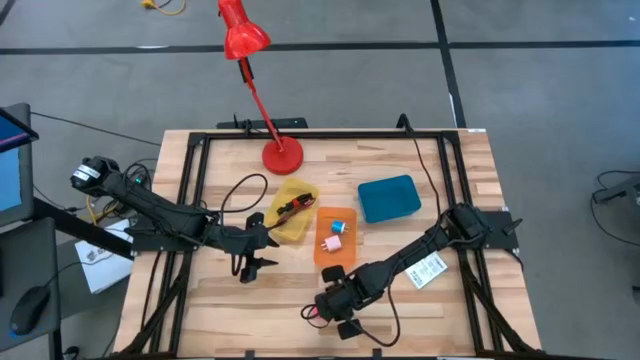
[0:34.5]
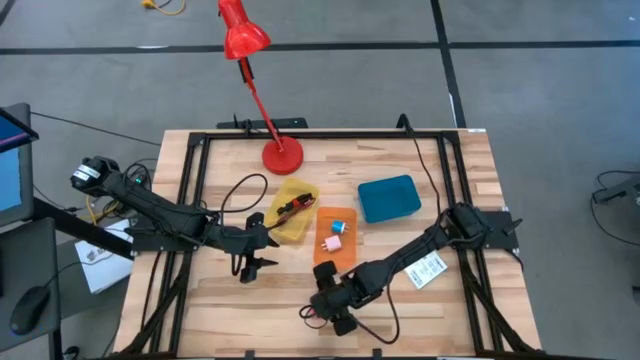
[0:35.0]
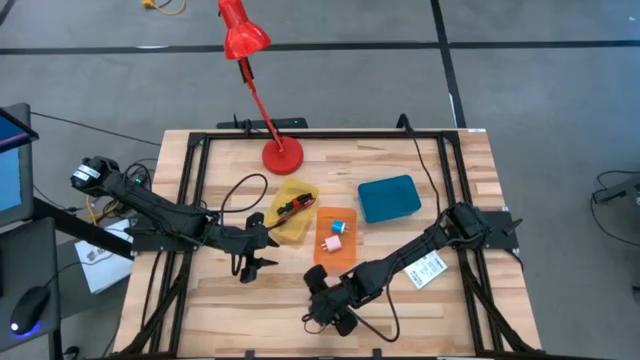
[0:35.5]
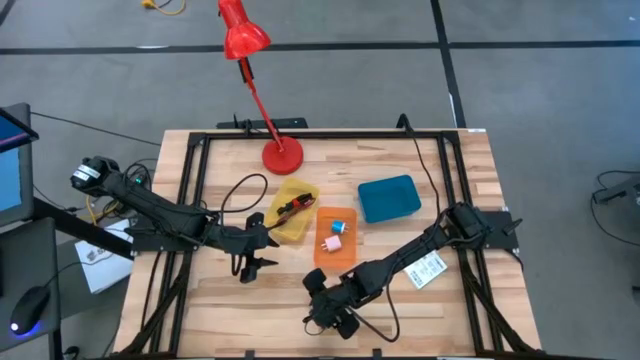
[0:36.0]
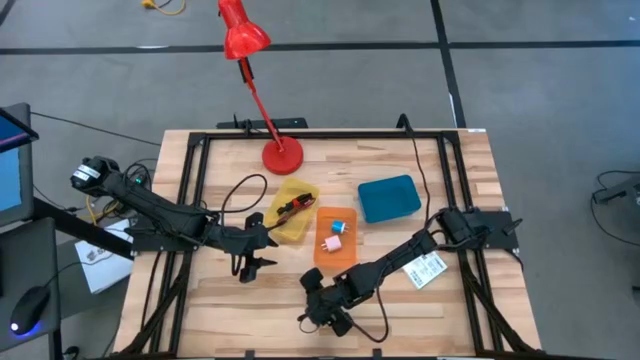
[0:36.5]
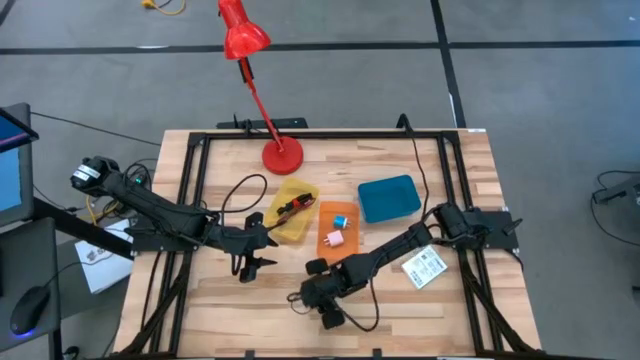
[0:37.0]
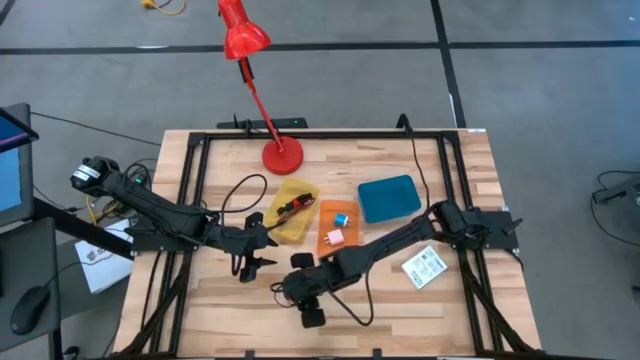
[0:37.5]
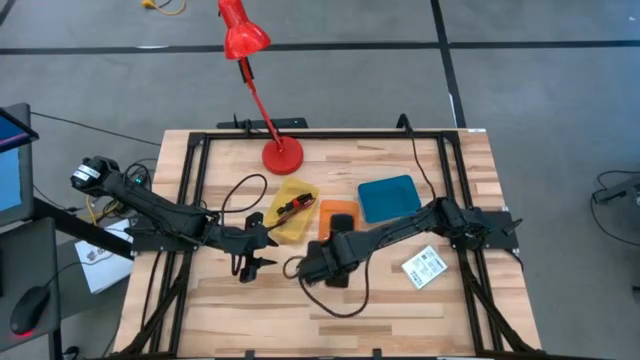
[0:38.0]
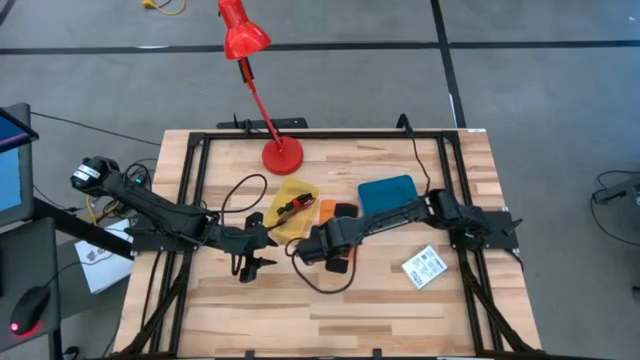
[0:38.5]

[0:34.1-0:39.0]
Task: Pick and place items into bin
Put the pink charger adapter into the orange bin

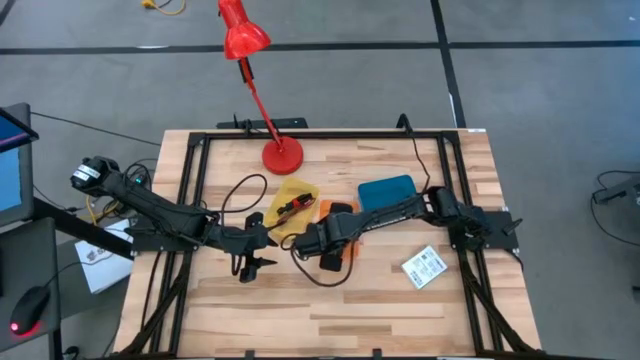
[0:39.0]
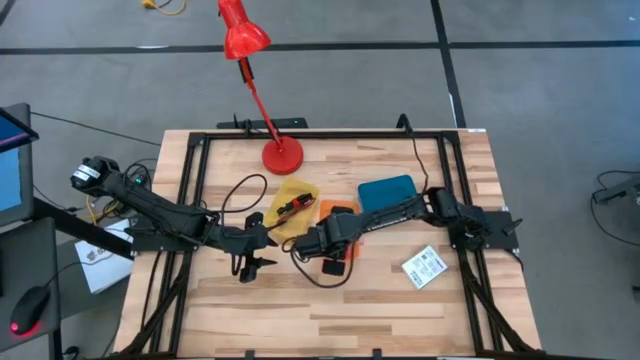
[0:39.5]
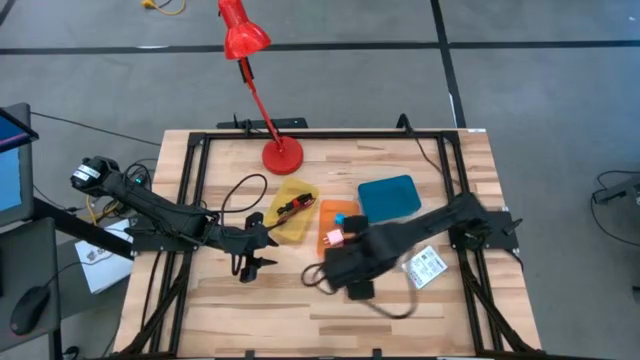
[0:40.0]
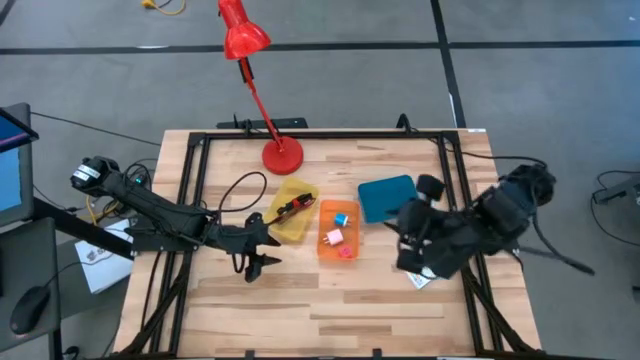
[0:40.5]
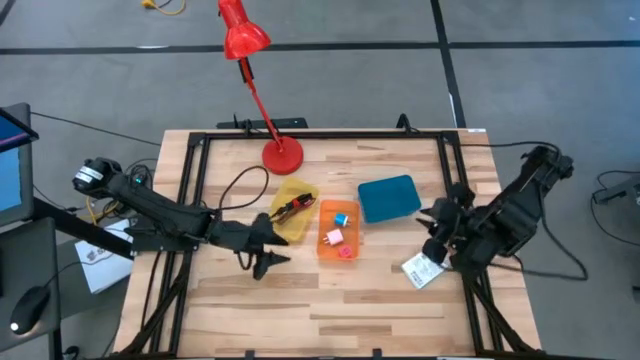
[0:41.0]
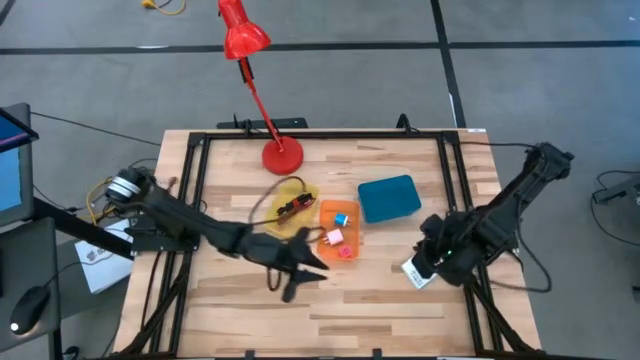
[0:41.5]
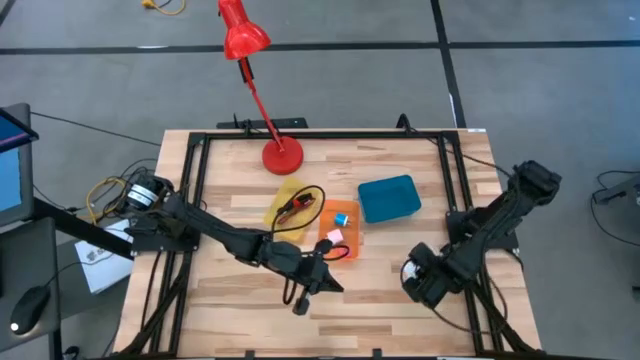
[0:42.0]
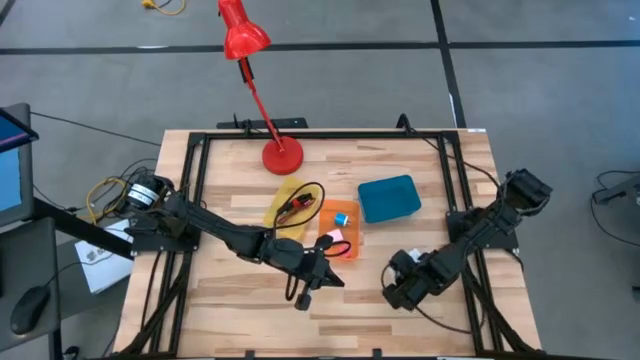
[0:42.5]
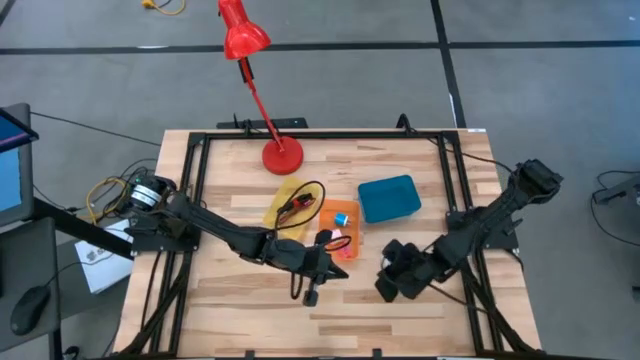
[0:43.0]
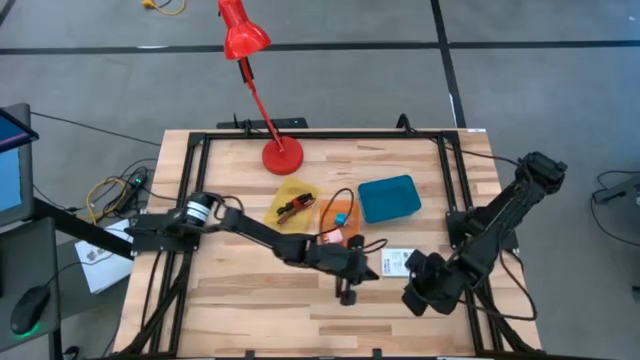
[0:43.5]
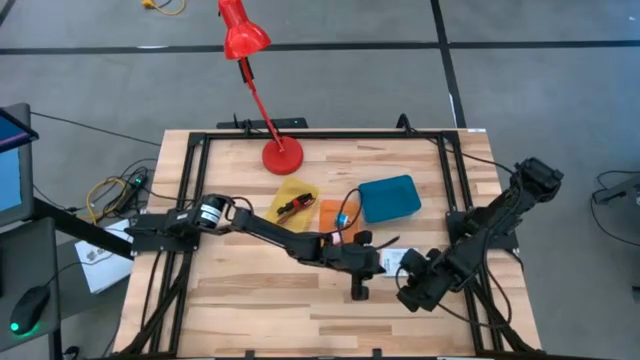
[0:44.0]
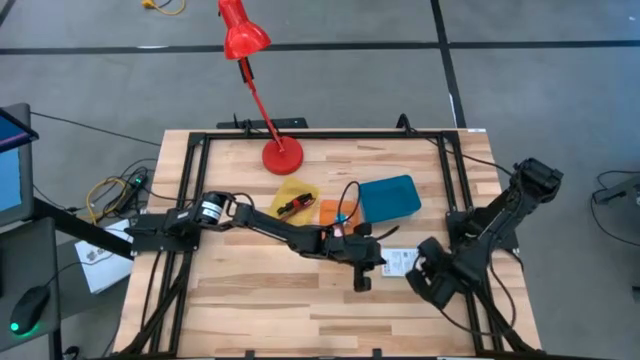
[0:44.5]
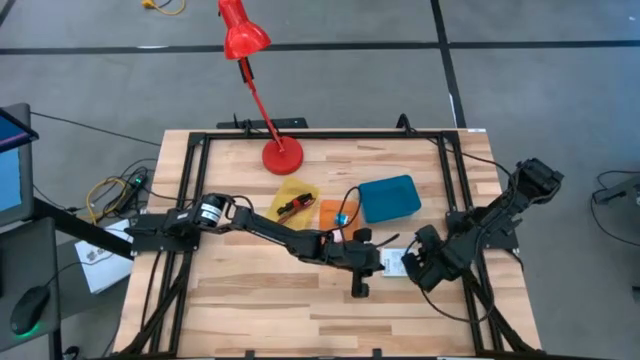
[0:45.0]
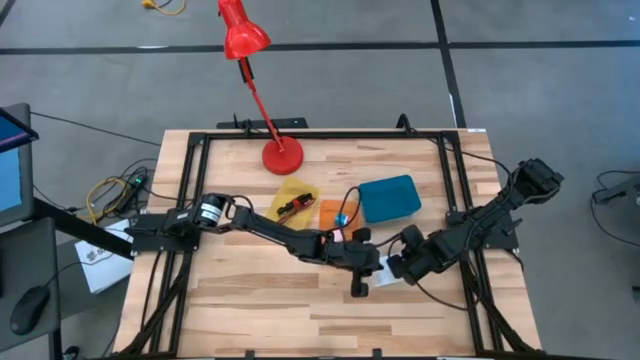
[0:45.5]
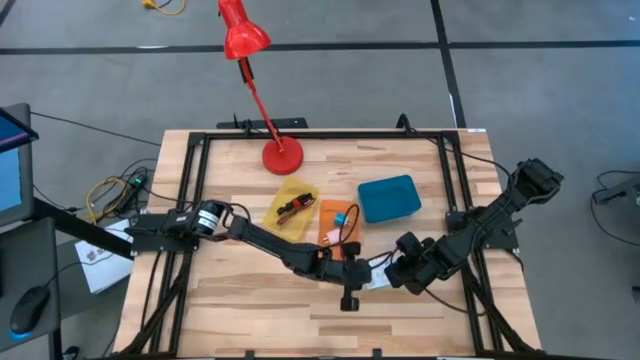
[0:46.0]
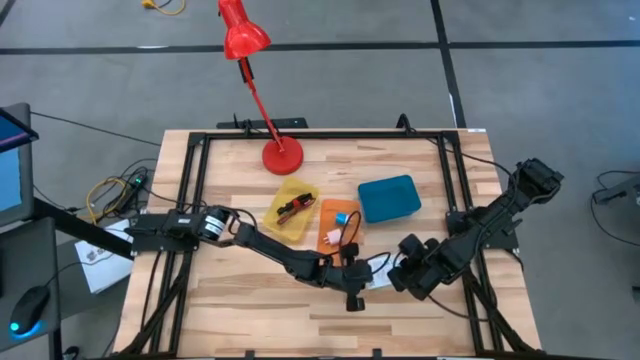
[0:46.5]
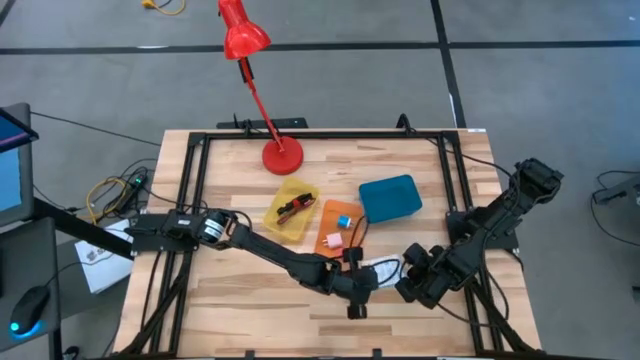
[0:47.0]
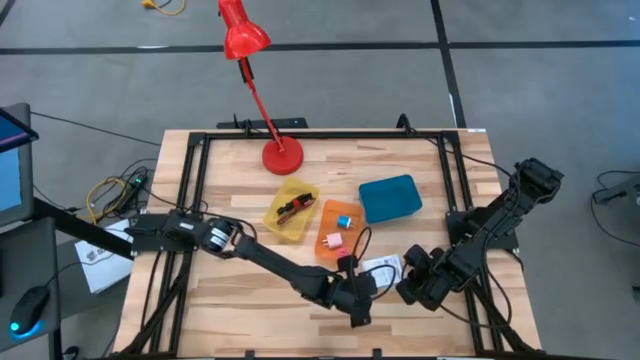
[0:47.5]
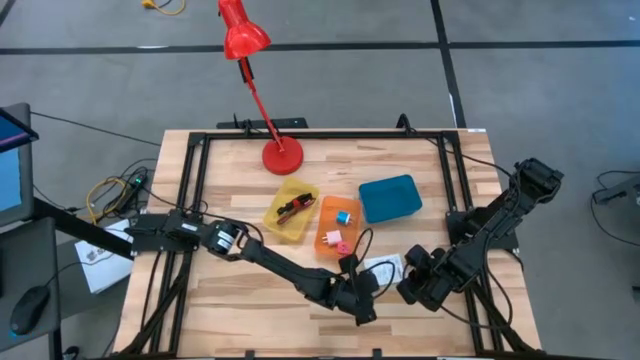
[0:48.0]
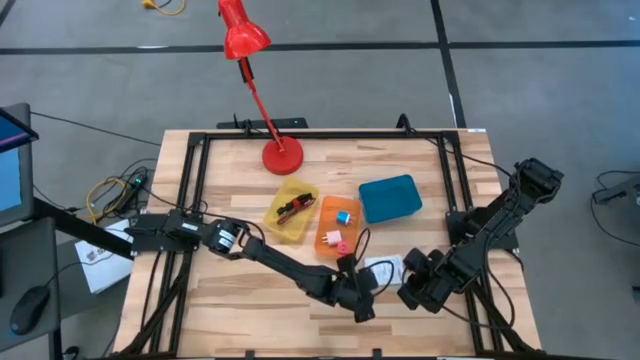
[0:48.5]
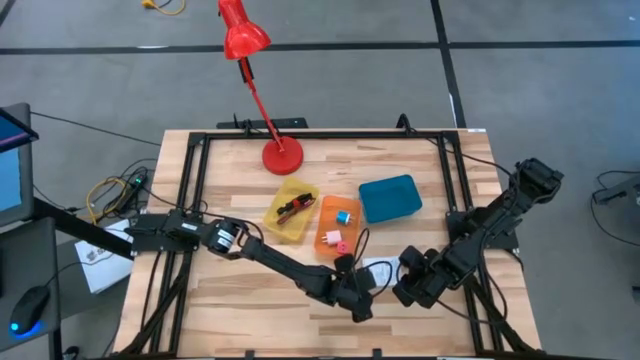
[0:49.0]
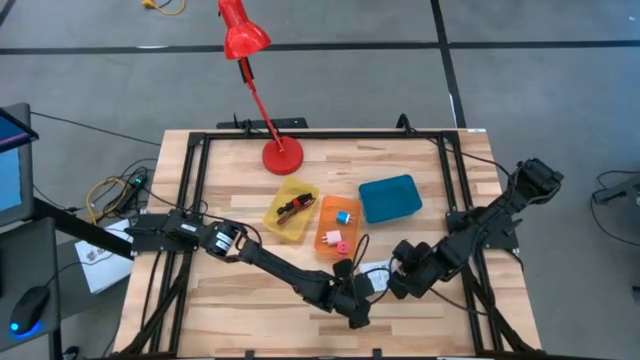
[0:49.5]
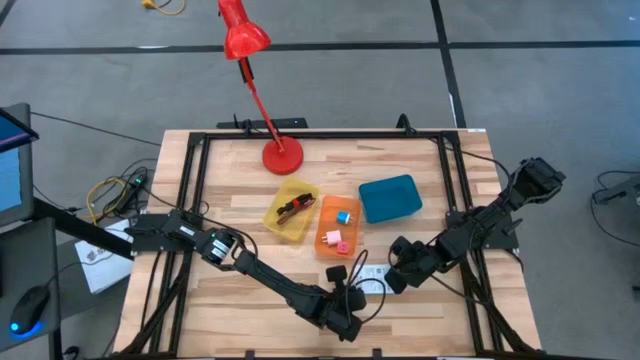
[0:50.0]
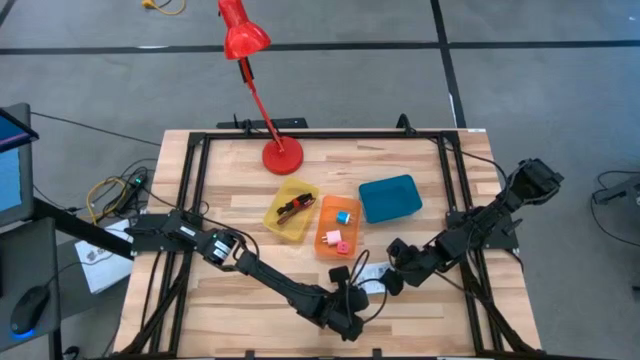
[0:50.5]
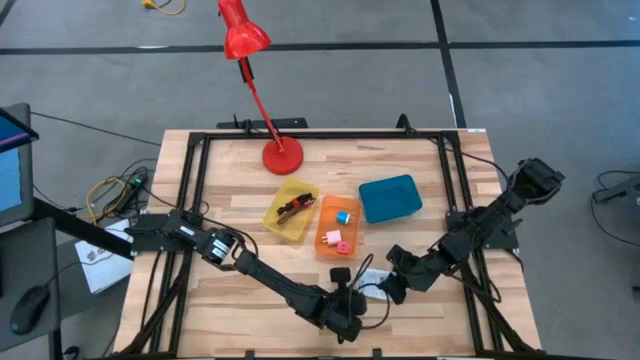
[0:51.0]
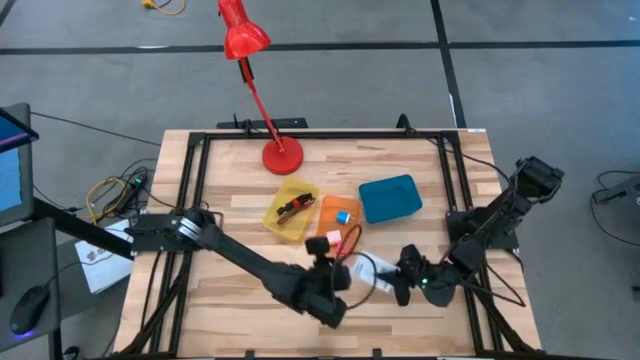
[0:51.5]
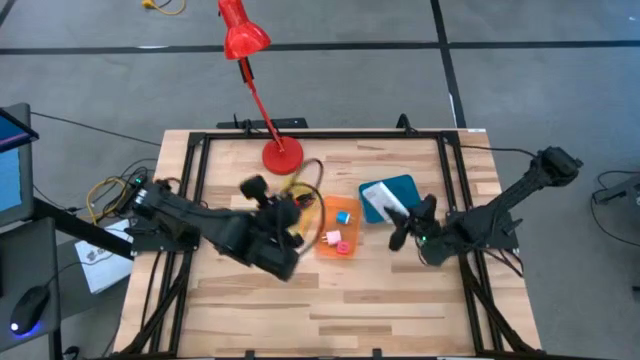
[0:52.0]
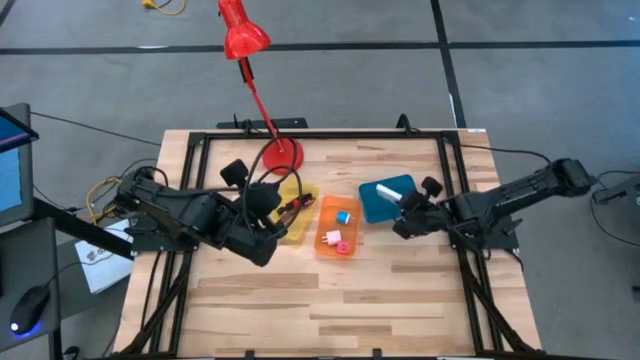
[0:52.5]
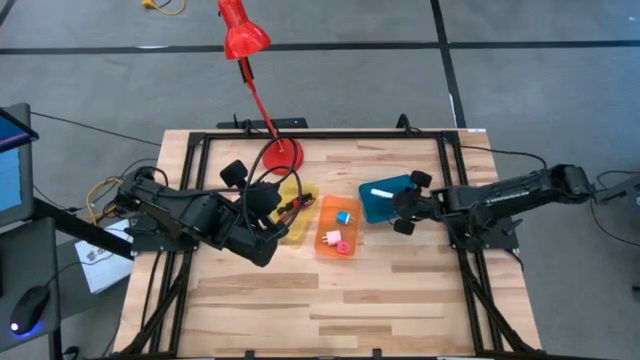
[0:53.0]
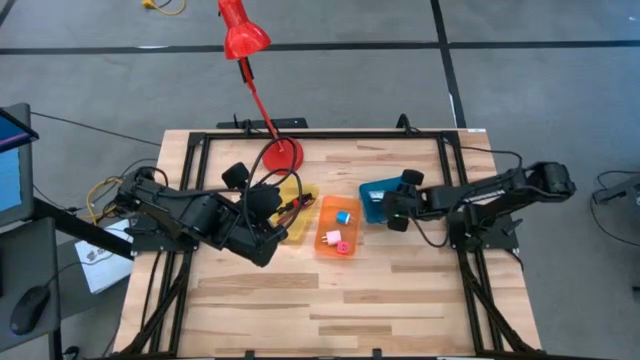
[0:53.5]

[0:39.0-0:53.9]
Put the white card reader box into the blue bin

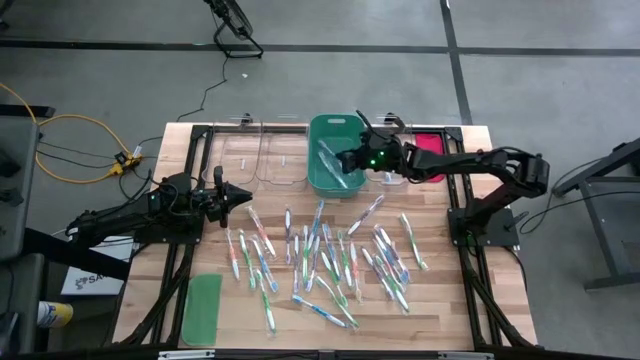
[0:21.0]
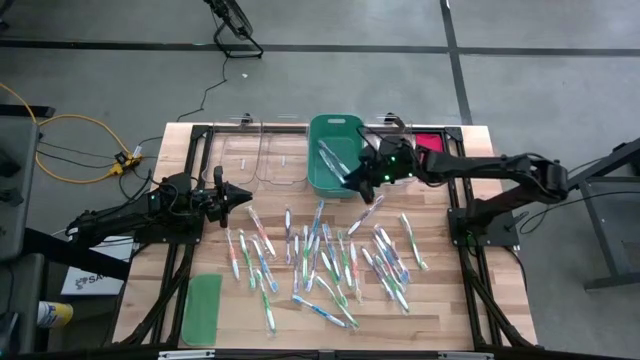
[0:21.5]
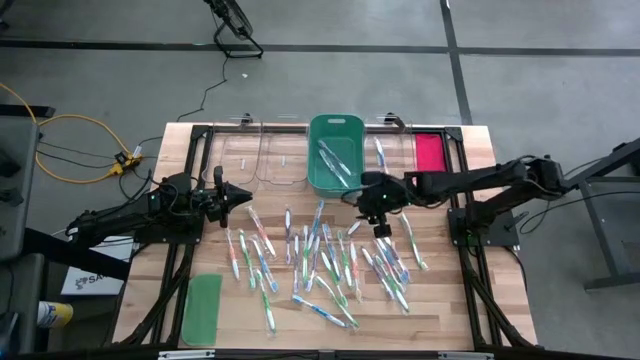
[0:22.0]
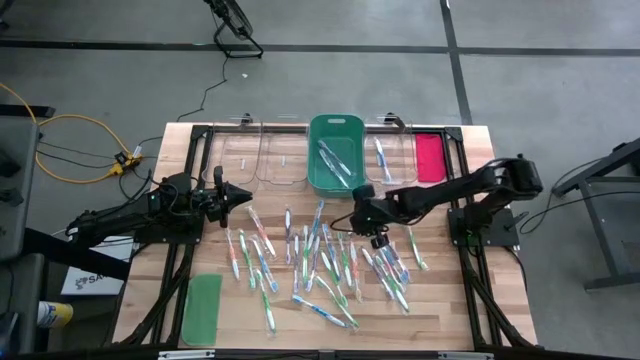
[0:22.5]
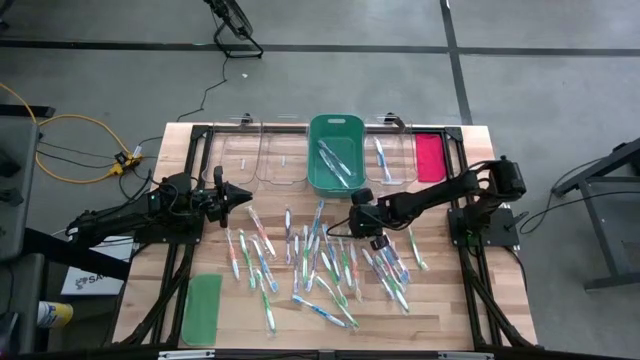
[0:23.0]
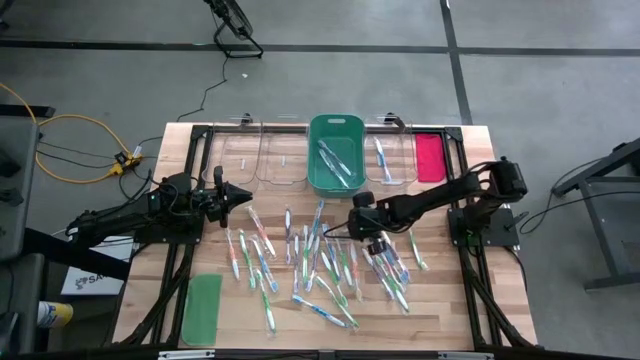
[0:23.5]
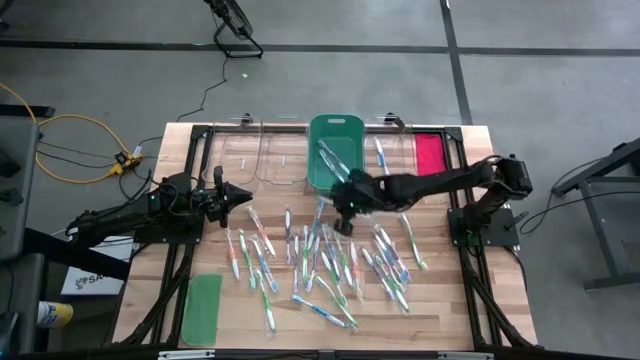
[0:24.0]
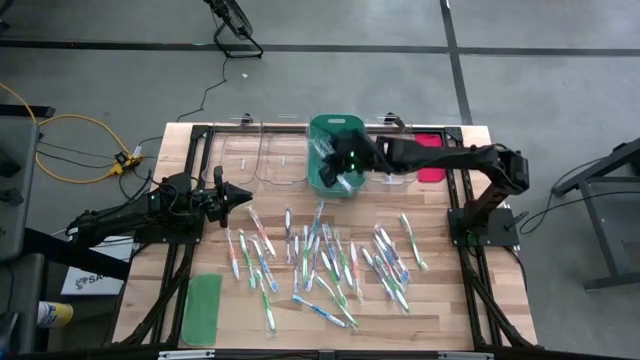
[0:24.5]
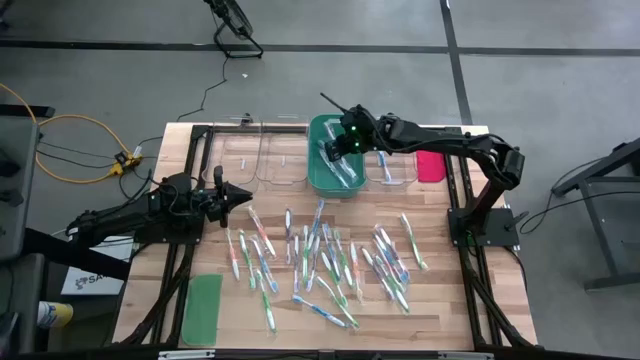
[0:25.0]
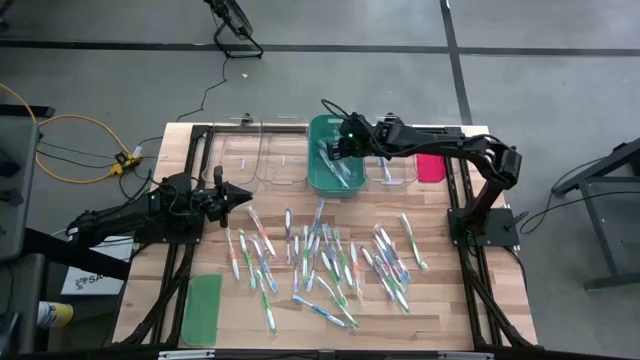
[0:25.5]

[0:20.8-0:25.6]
Task: Pick & Place Toothbrushes
Put the purple toothbrush into the green bin
